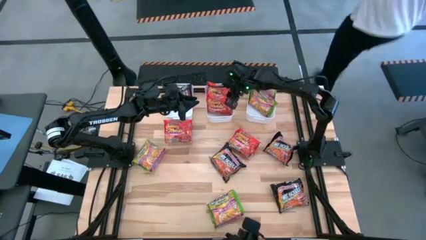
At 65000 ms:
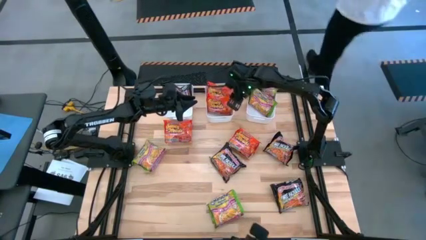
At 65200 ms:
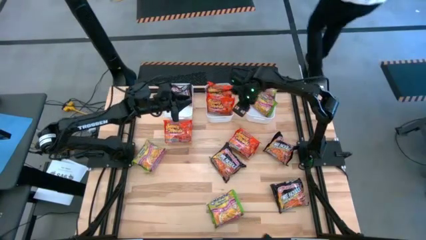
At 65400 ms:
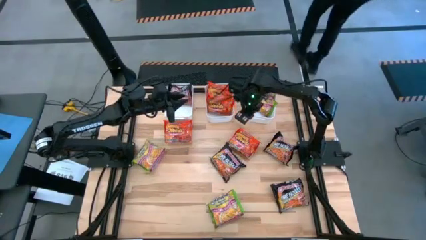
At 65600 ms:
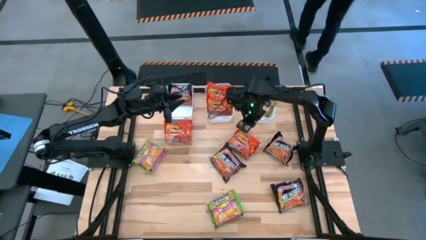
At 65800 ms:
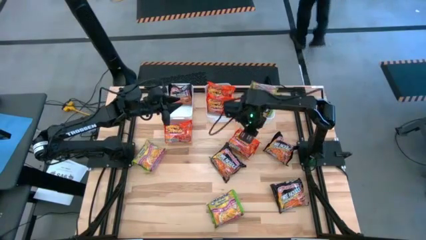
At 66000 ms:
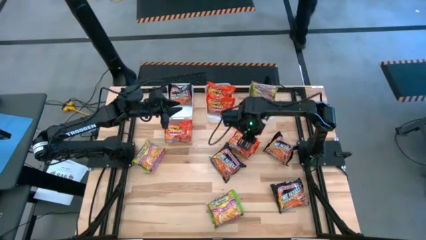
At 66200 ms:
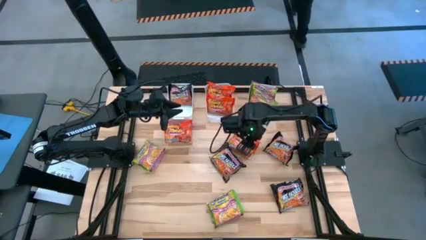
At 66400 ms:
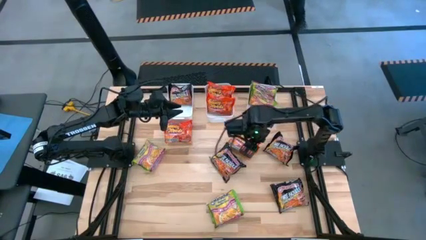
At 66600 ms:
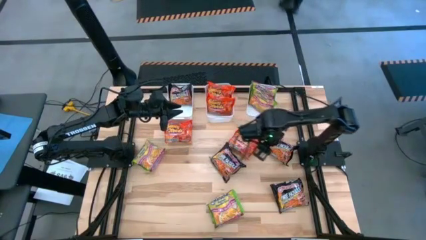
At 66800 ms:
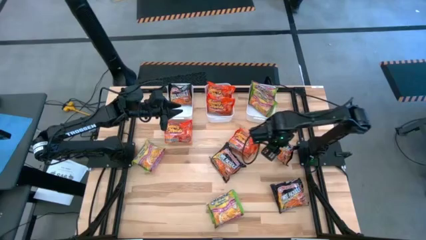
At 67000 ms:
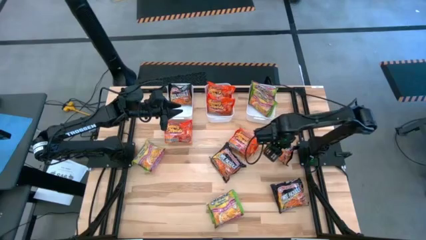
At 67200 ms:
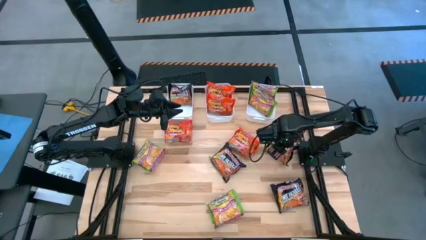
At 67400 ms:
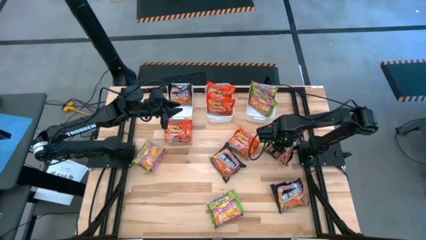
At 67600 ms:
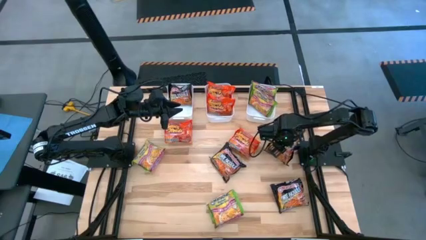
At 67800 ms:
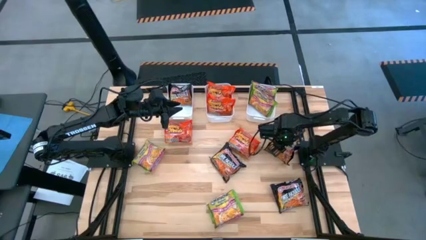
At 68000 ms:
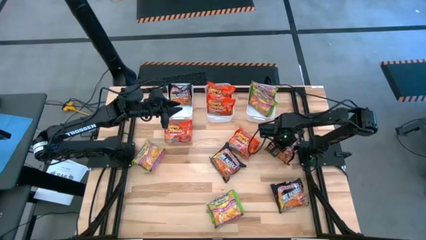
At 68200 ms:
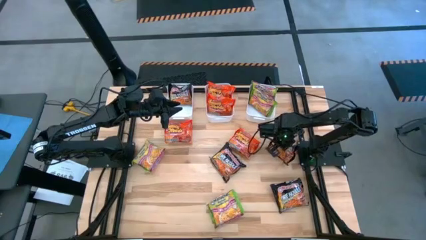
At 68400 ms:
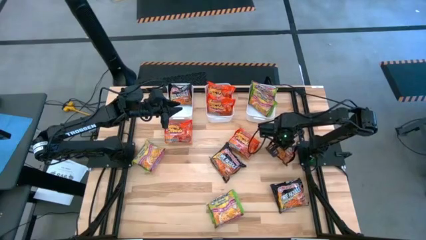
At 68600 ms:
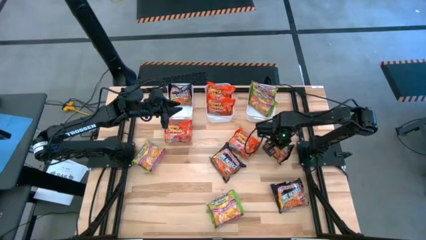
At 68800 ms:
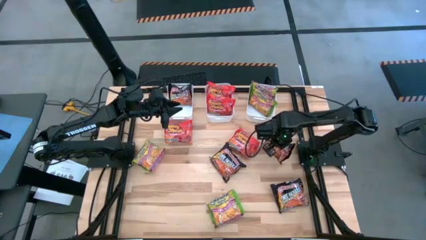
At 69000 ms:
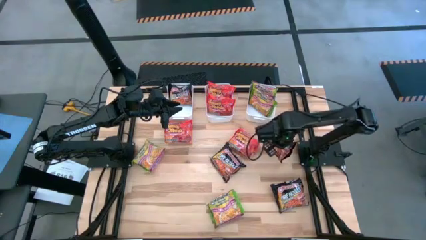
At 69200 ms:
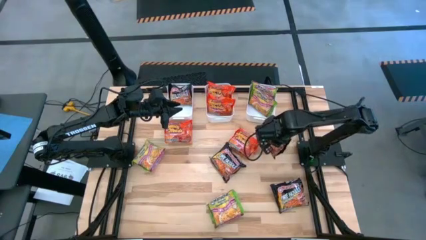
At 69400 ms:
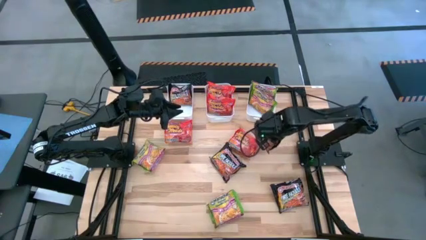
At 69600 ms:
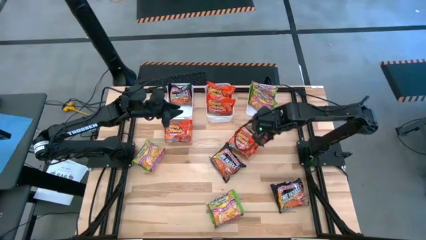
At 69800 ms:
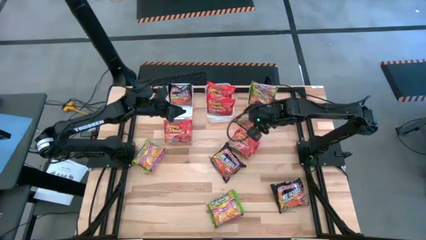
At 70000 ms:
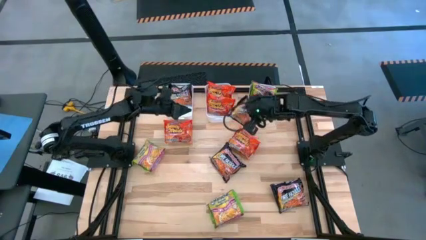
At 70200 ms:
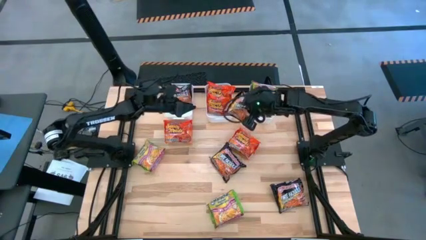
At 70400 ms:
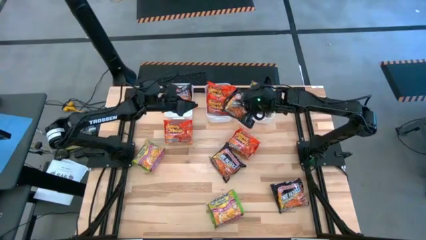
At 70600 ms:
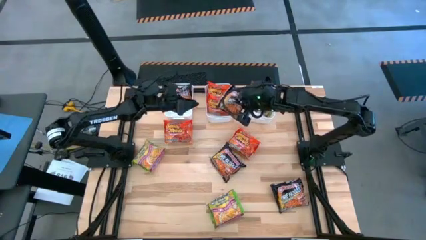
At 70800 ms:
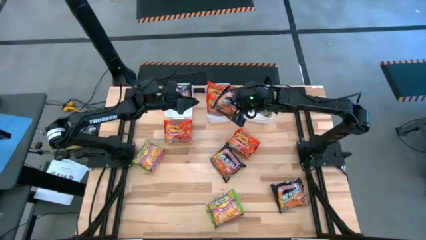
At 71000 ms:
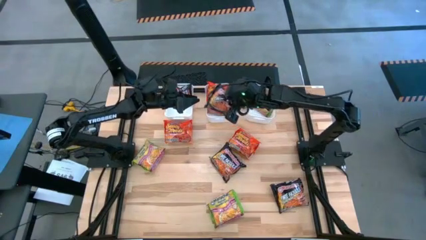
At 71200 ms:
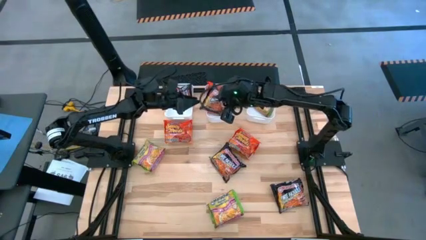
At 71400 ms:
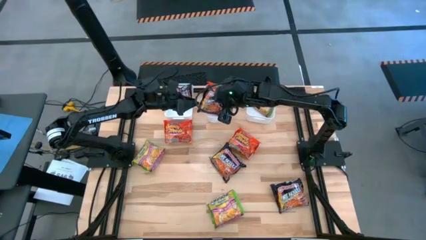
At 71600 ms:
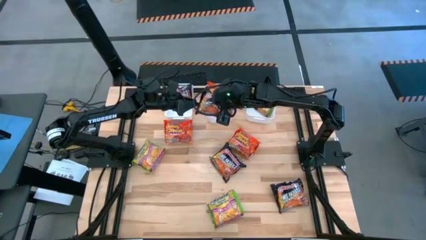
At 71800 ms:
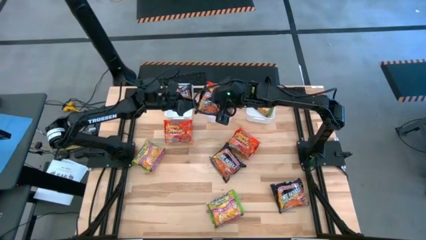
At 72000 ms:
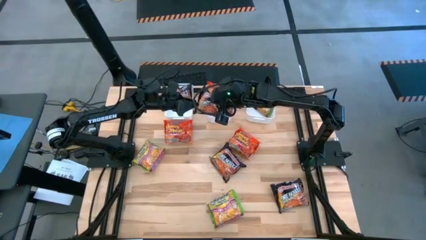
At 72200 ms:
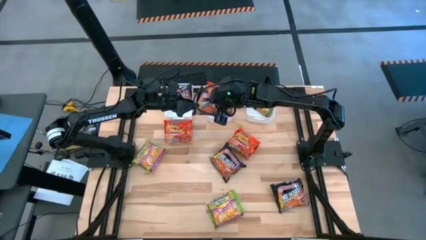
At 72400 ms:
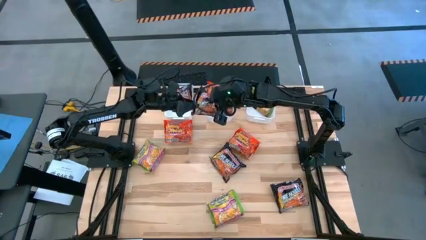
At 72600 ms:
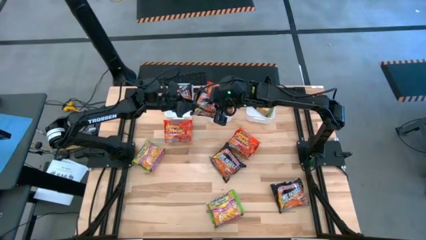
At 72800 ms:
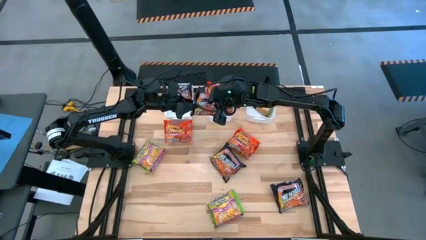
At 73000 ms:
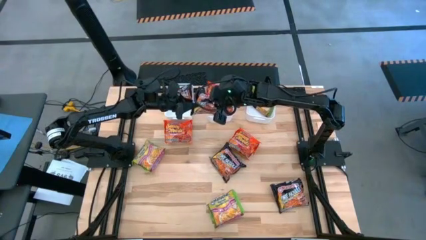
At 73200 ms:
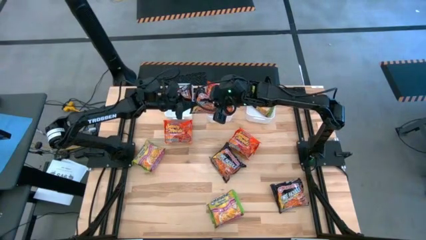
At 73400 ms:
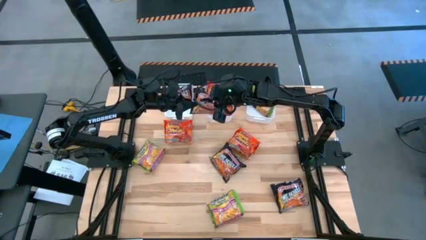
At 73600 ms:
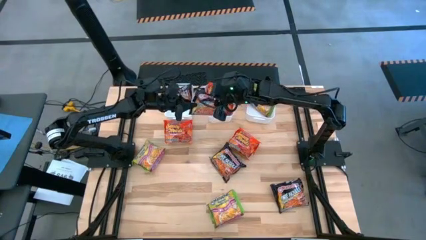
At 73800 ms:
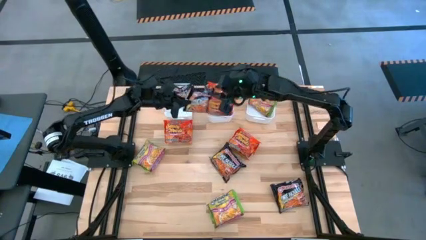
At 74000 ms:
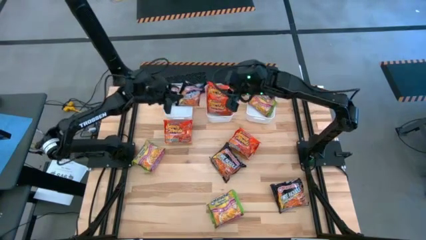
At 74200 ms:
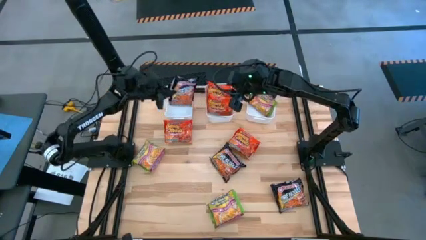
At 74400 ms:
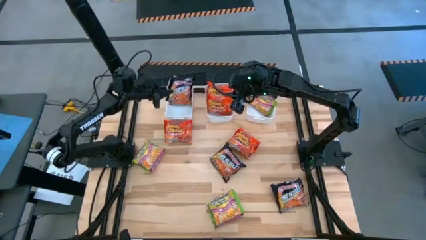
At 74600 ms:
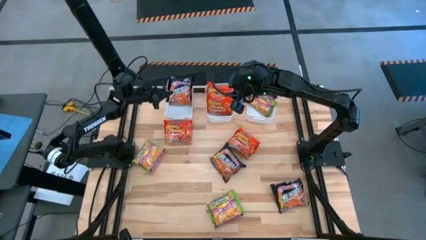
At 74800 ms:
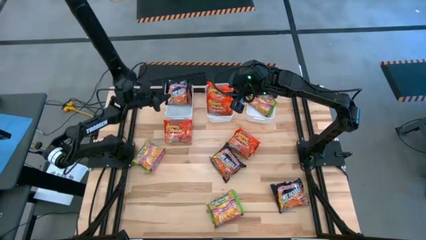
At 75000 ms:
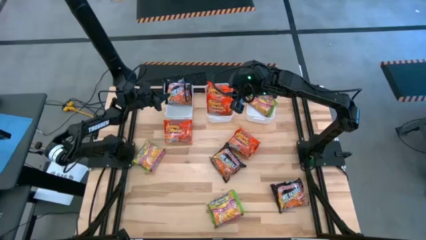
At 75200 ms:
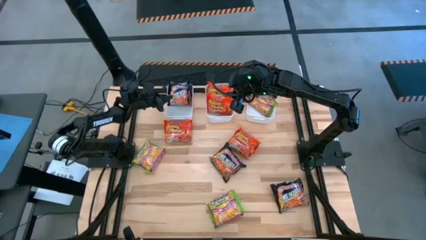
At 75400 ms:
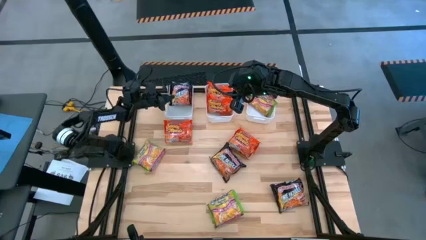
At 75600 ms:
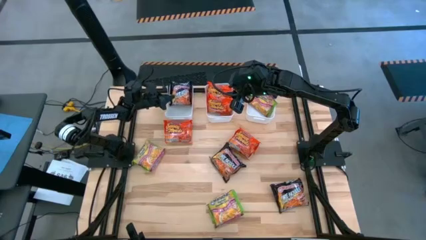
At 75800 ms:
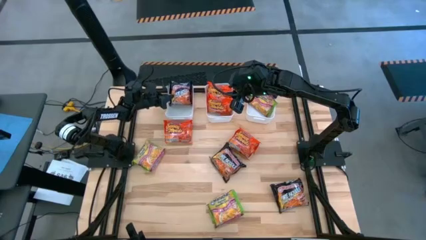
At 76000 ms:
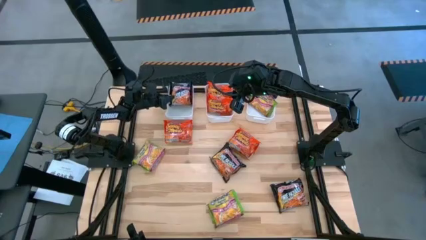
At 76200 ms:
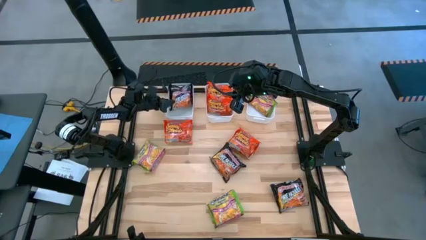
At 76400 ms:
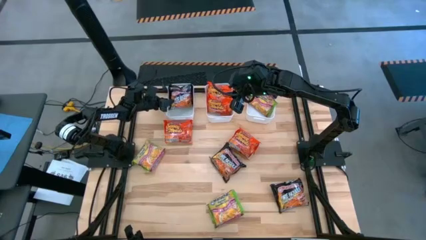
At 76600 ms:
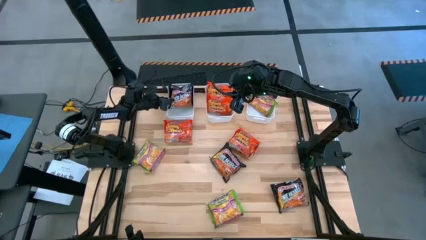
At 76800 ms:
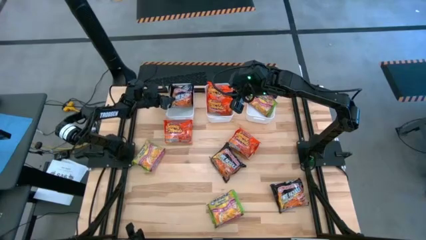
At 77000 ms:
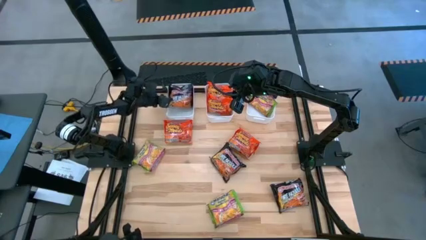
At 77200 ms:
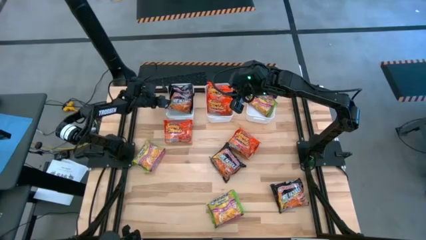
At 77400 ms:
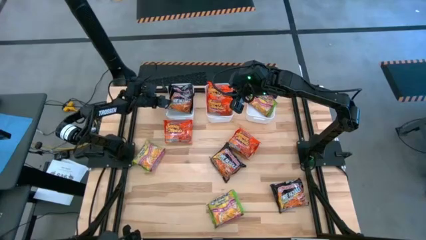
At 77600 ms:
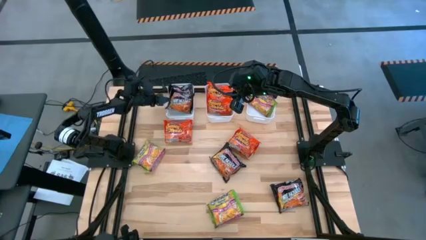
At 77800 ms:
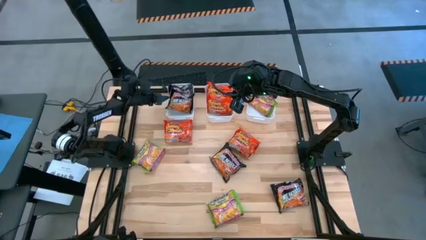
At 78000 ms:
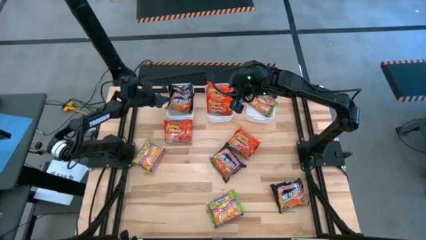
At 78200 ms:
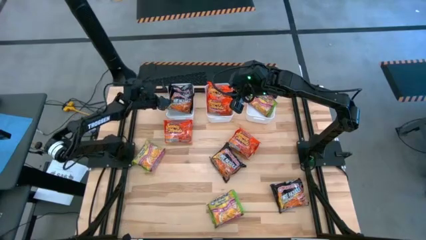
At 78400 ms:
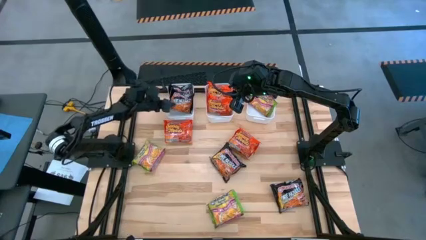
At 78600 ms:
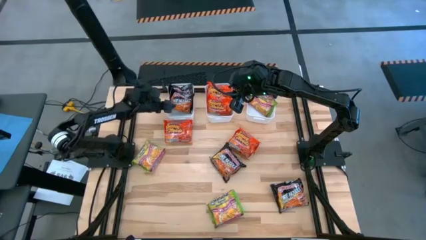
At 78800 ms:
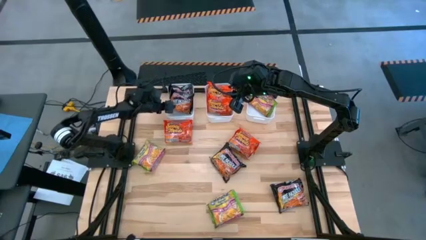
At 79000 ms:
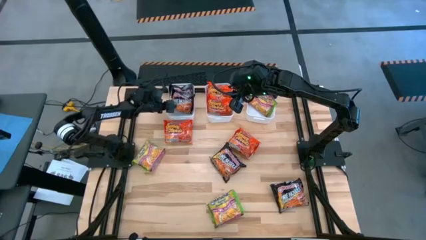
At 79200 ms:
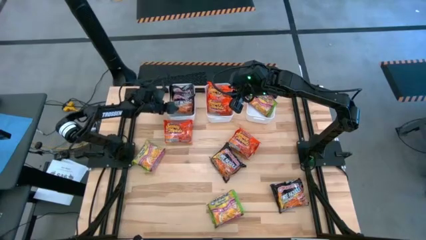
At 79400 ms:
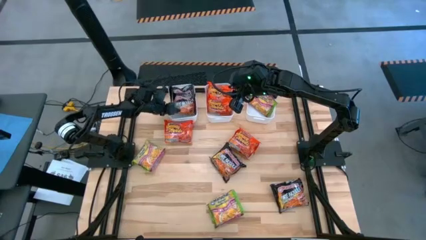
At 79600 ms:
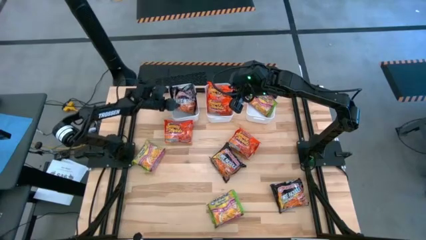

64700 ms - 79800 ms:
Task: Sort Maruchan noodles
Put the black noodle pack into the left white bin

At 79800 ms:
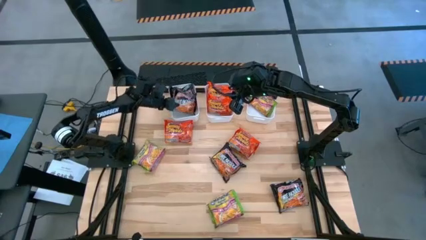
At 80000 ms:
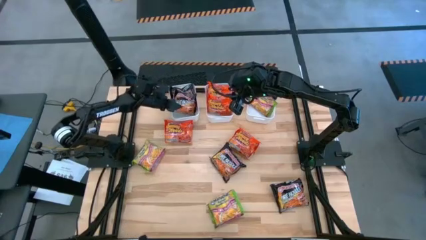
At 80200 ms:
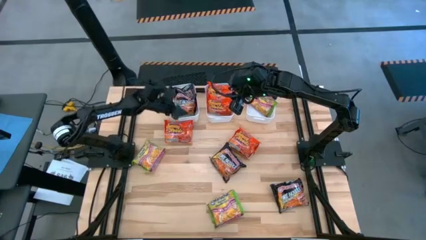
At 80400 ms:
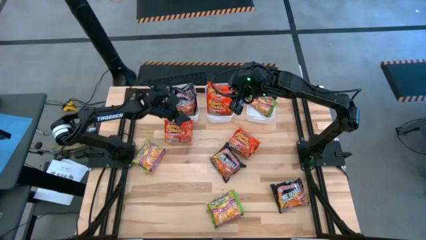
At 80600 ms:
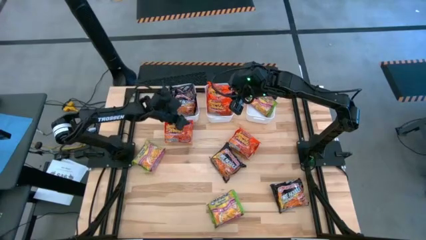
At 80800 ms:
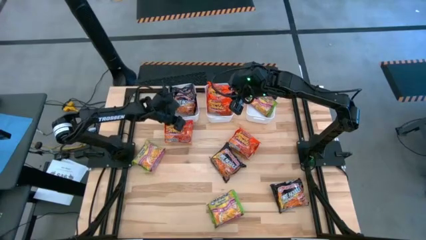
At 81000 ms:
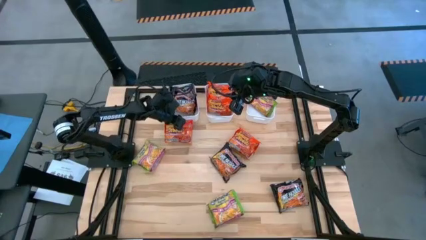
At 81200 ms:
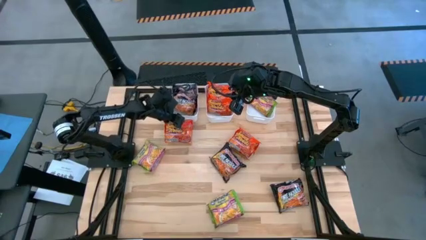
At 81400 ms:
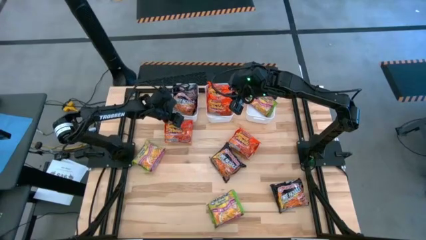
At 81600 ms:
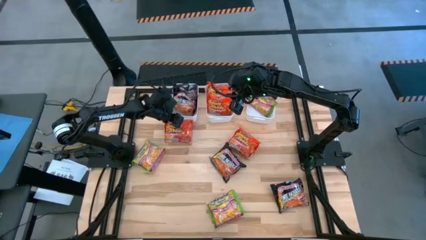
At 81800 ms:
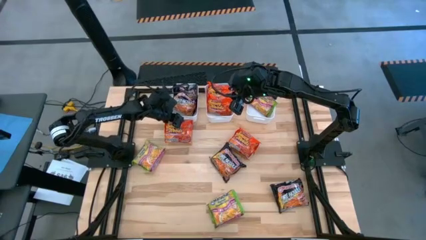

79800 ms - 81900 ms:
Adjust the left white bin on the table
